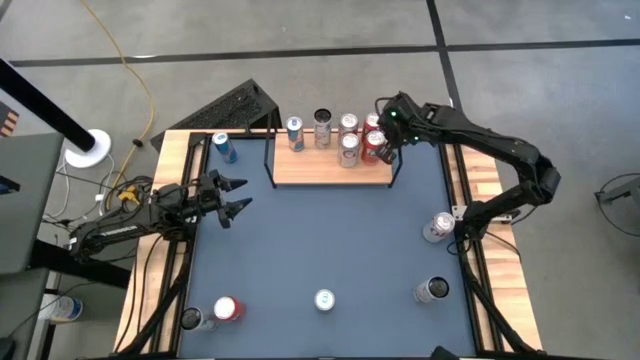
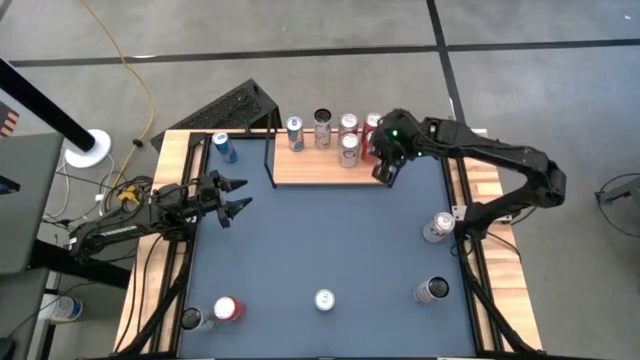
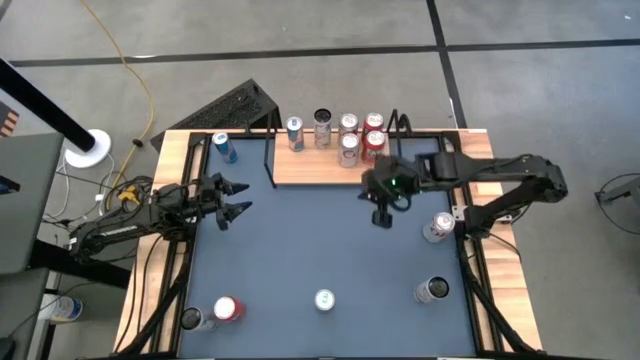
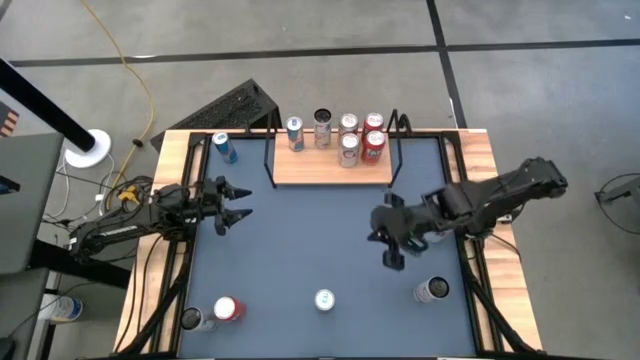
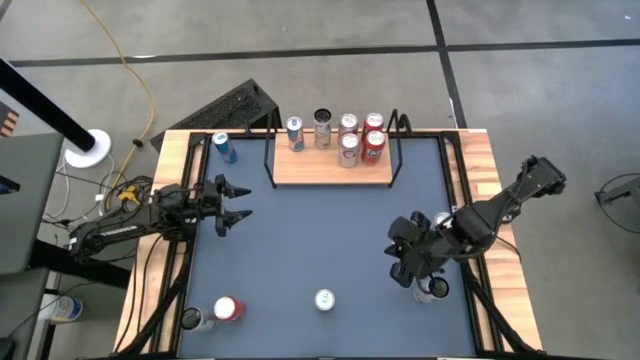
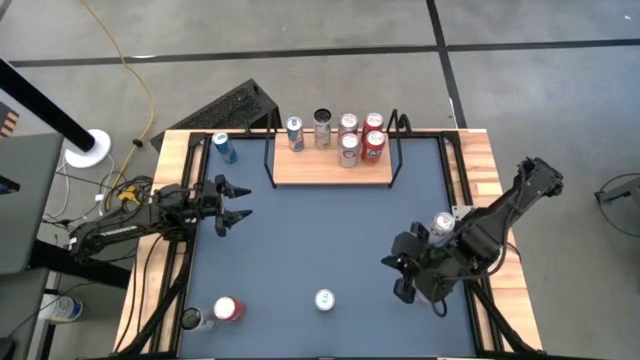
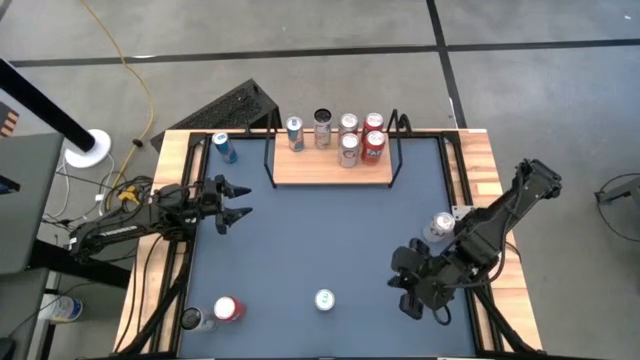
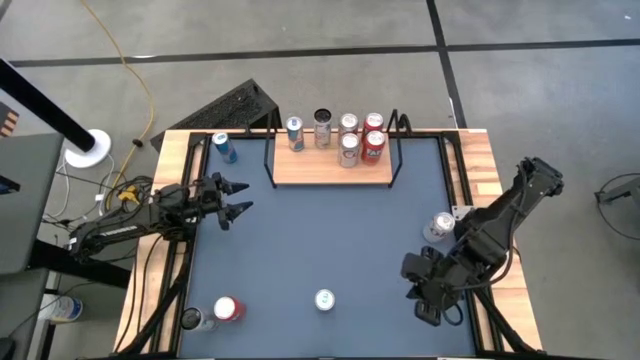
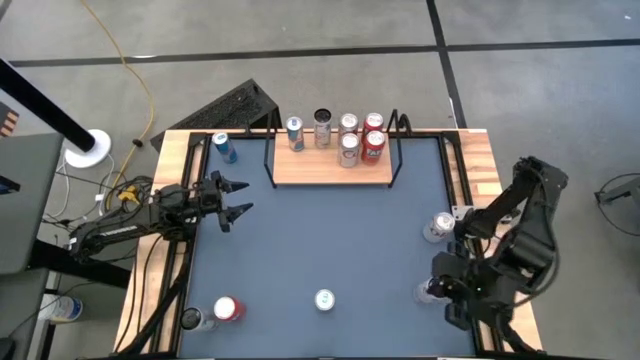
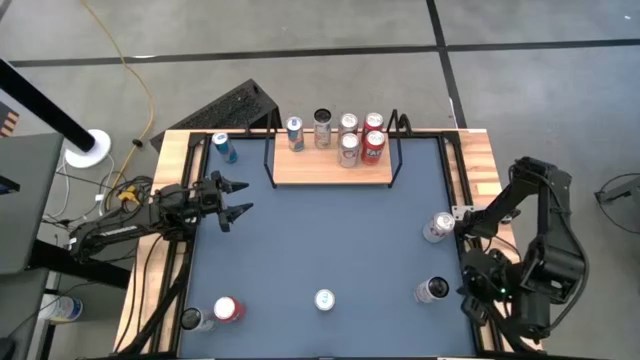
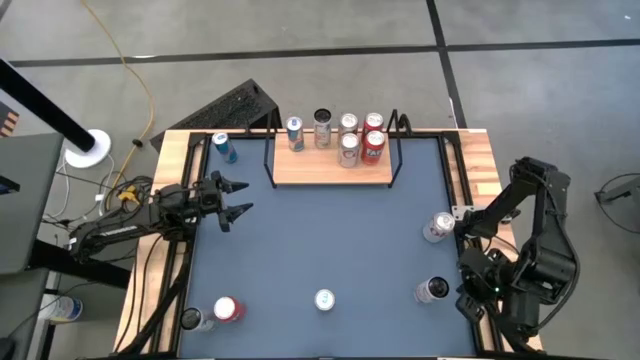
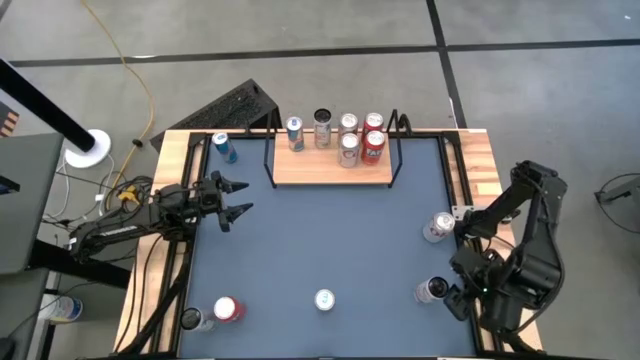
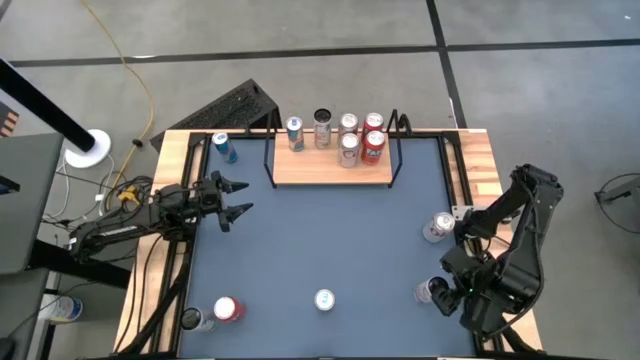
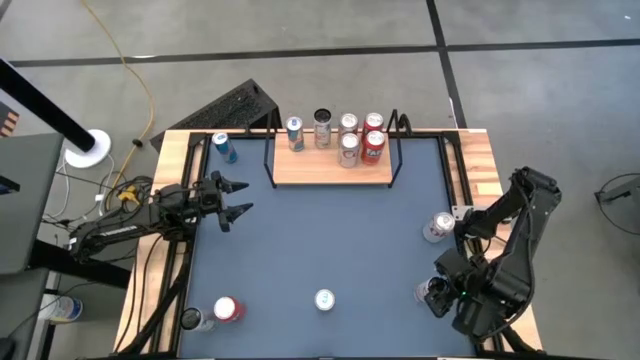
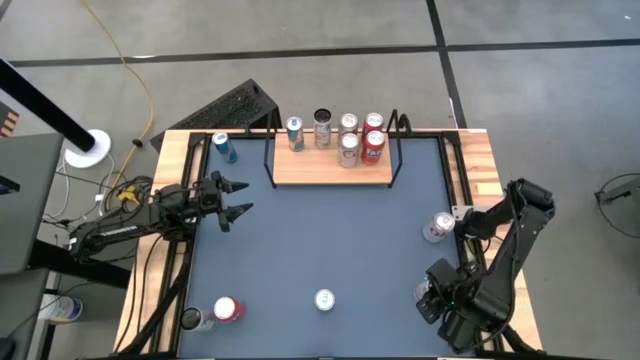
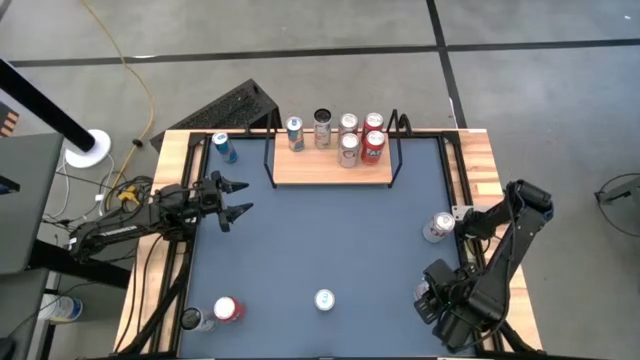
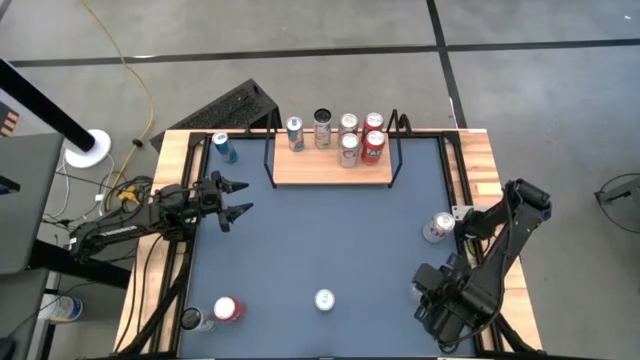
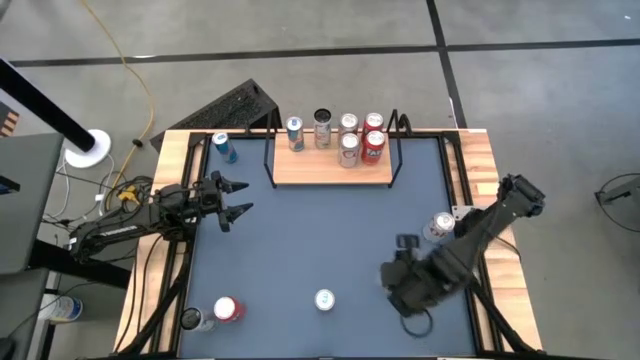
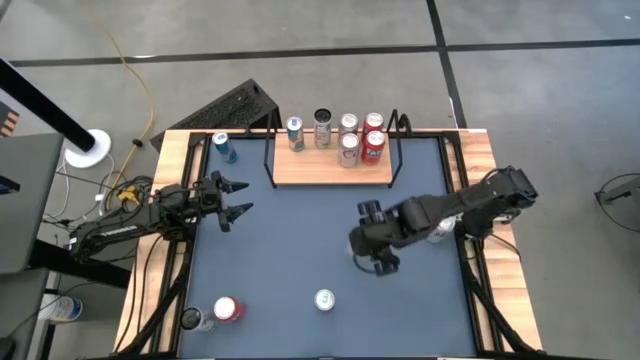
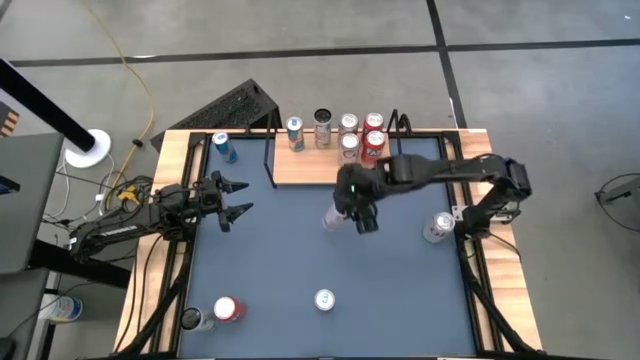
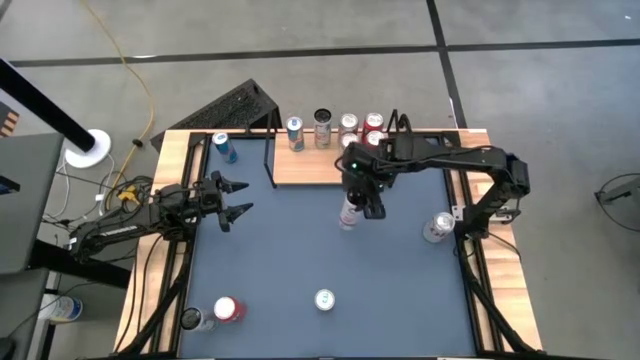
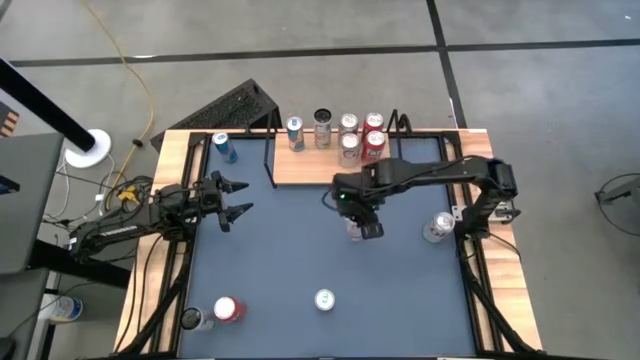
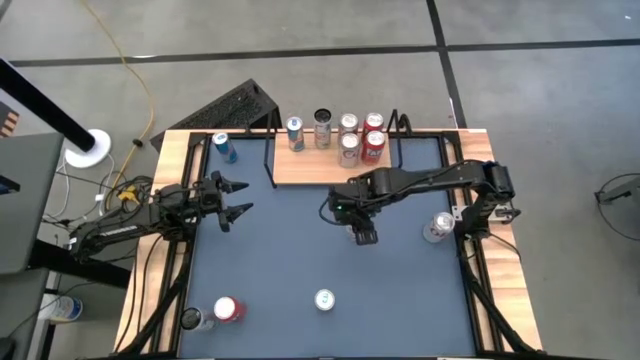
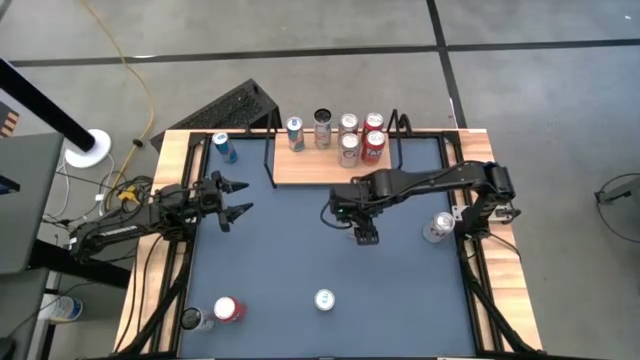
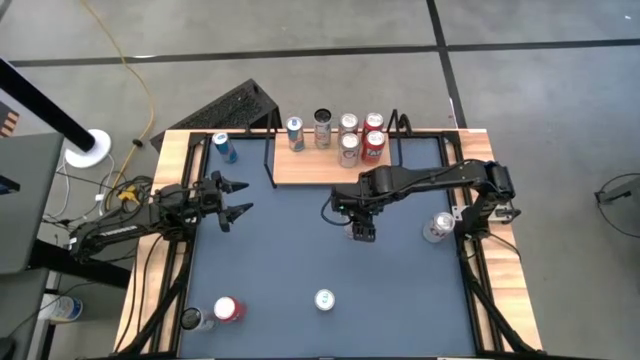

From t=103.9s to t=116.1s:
Task: Place canned beverage on shelf
Put the right white-pink can on the shelf aligned with the other white-pink soda can

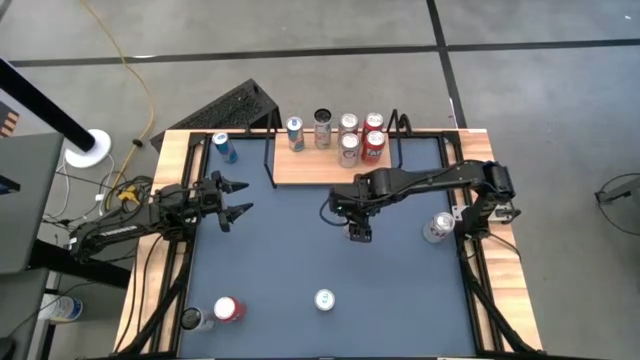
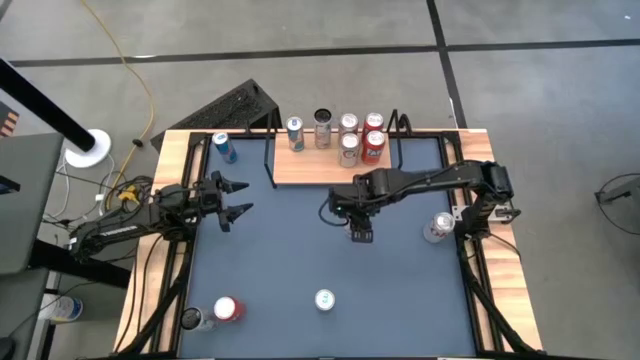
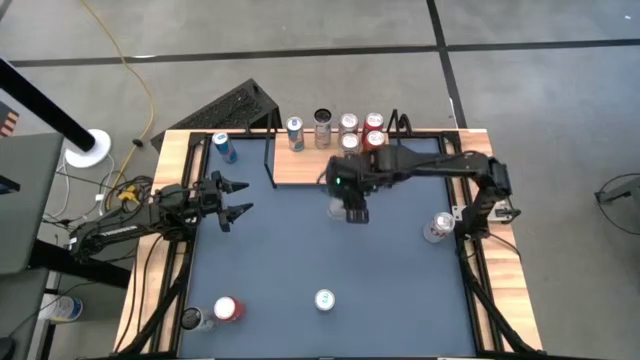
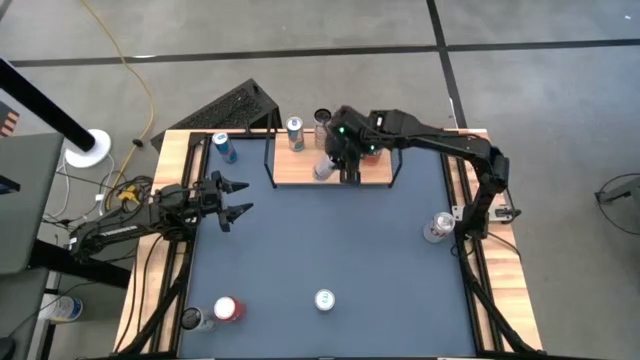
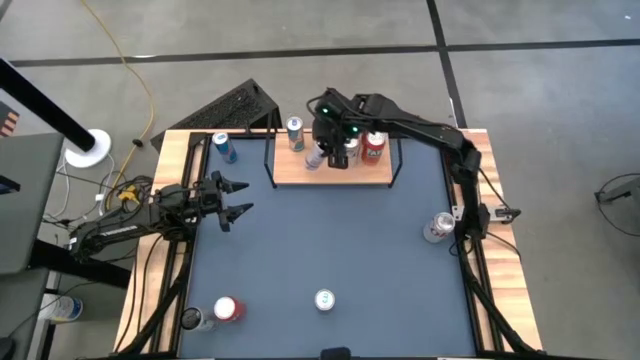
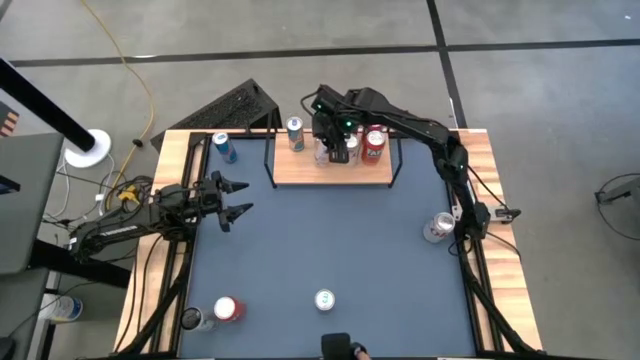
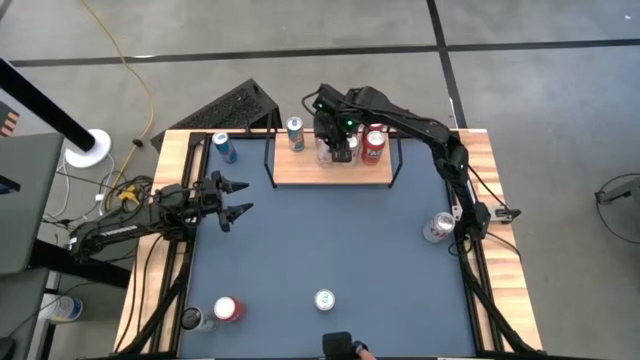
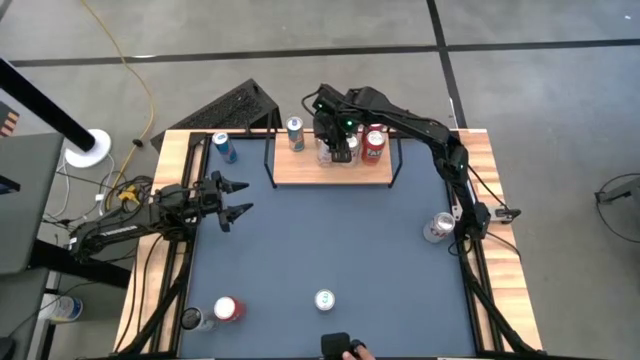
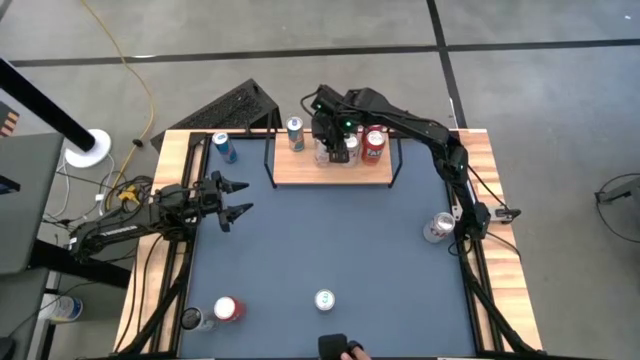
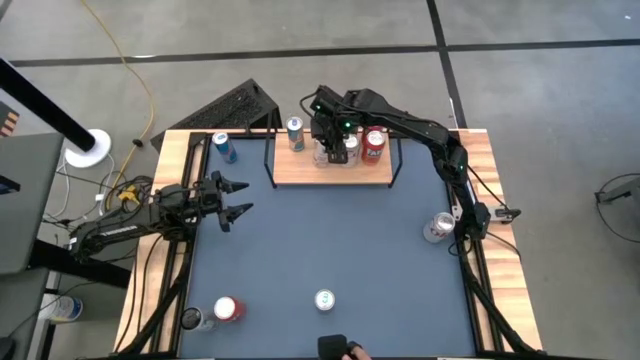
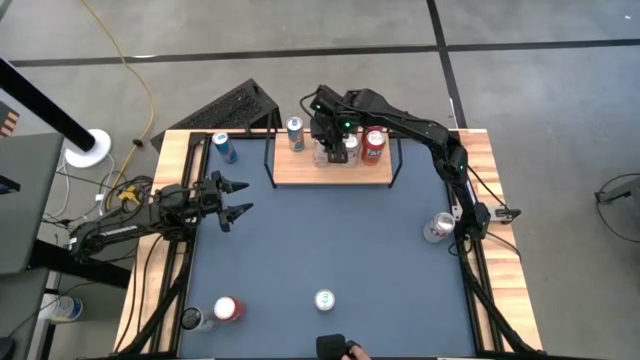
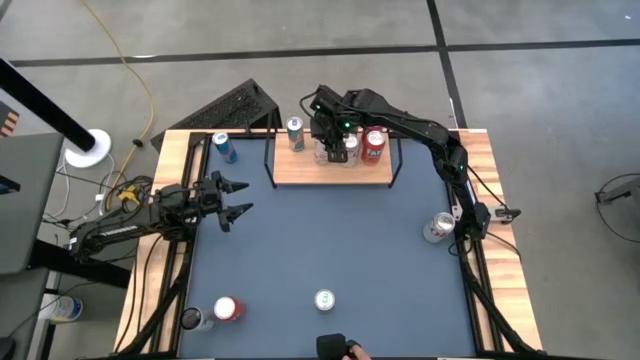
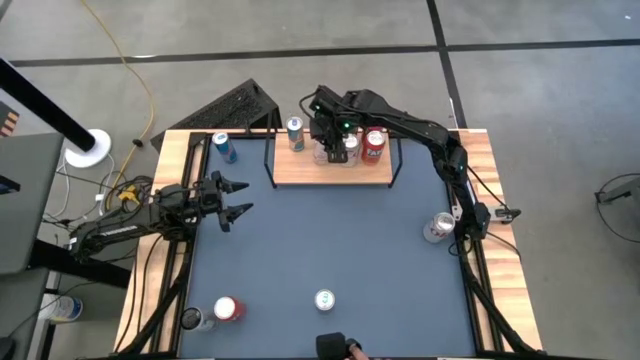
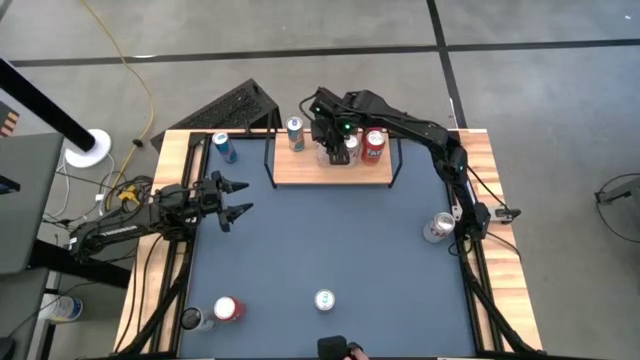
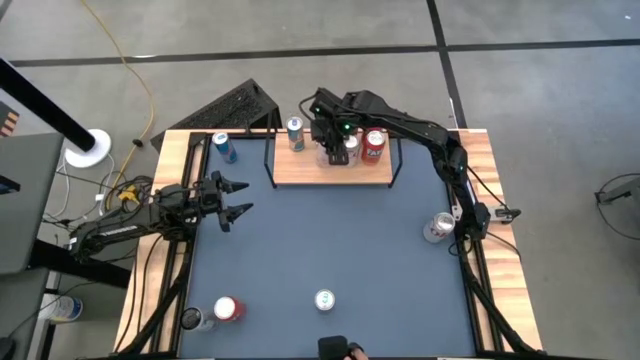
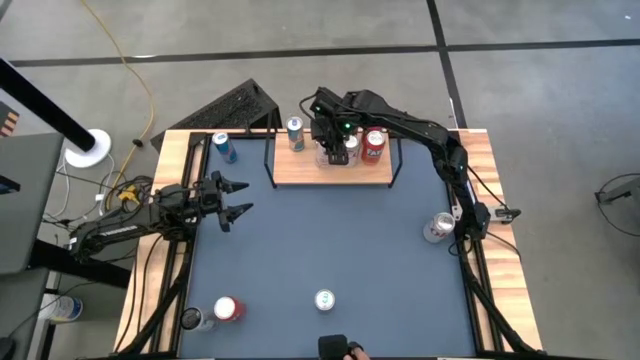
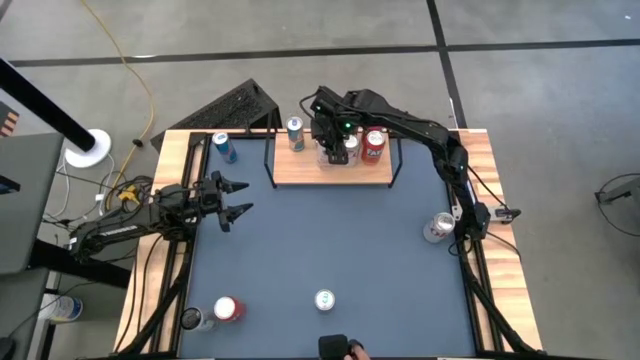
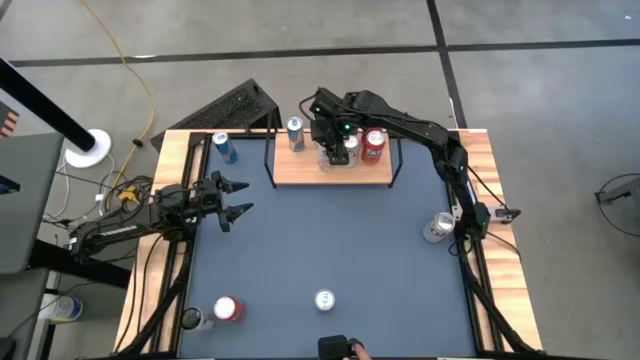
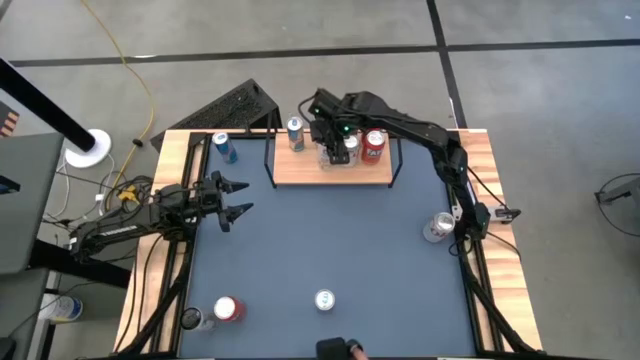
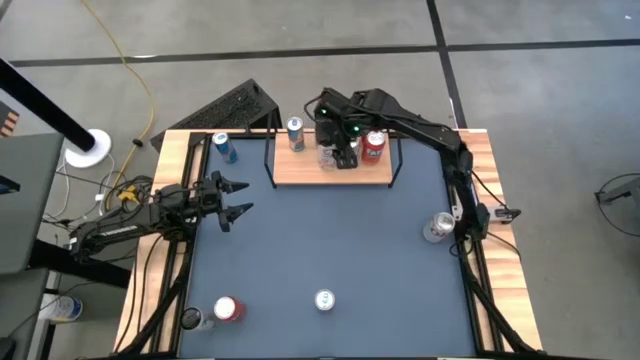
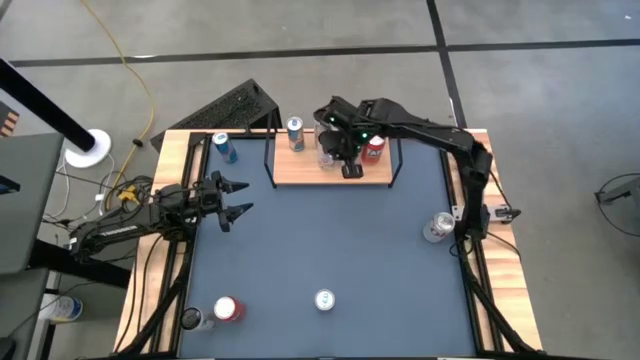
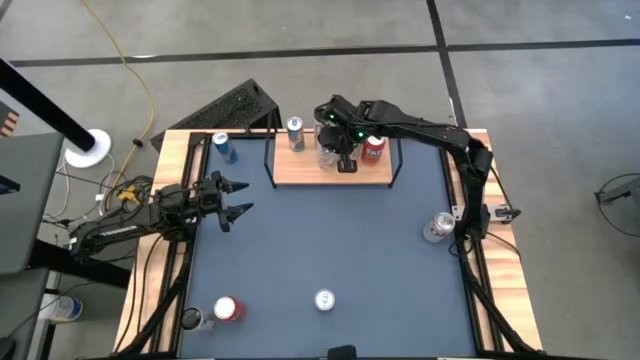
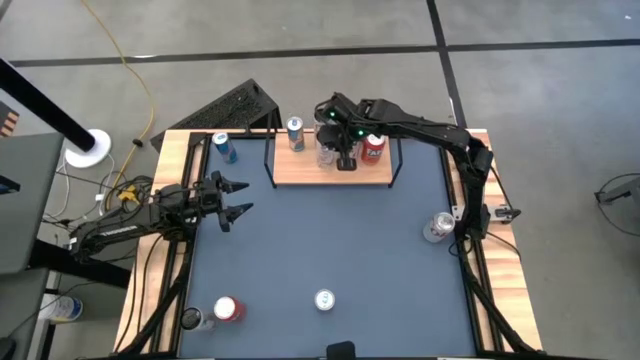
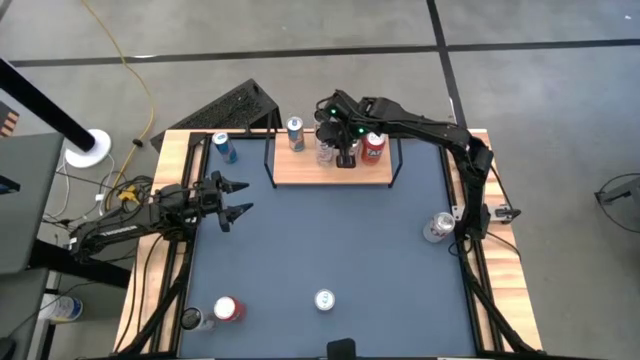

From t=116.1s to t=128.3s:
Put the right white-pink can on the shelf aligned with the other white-pink soda can
